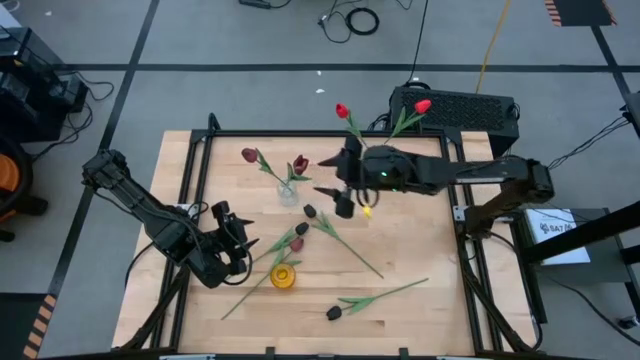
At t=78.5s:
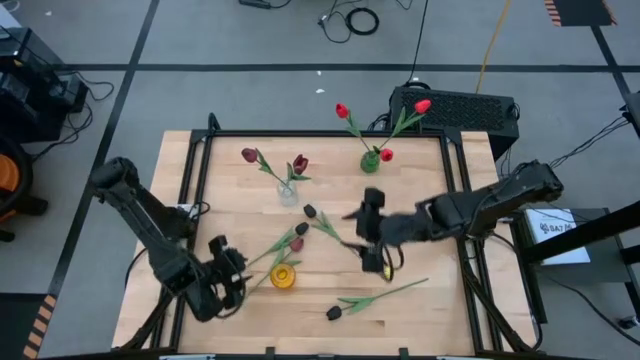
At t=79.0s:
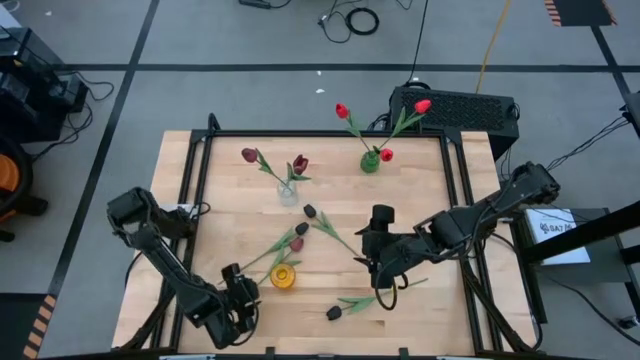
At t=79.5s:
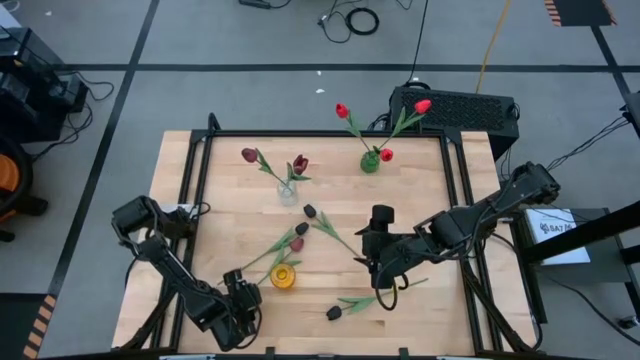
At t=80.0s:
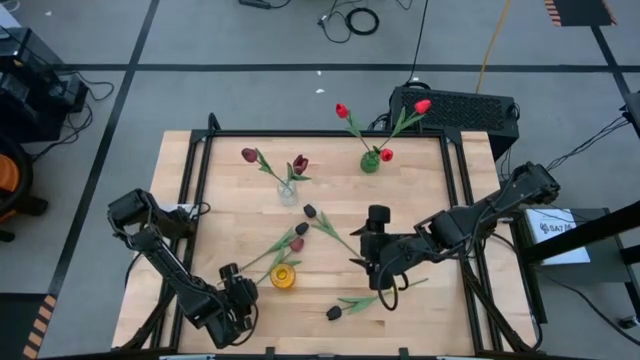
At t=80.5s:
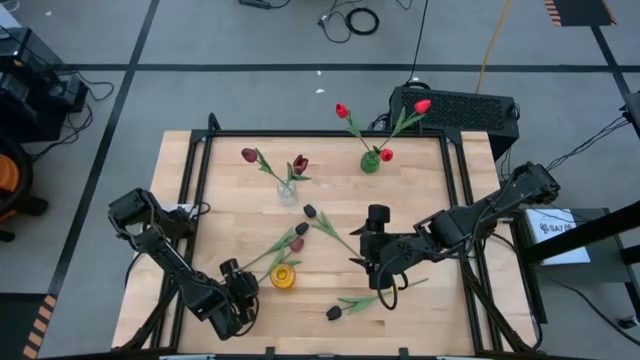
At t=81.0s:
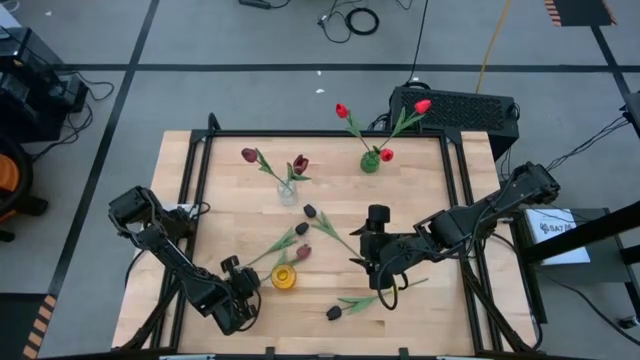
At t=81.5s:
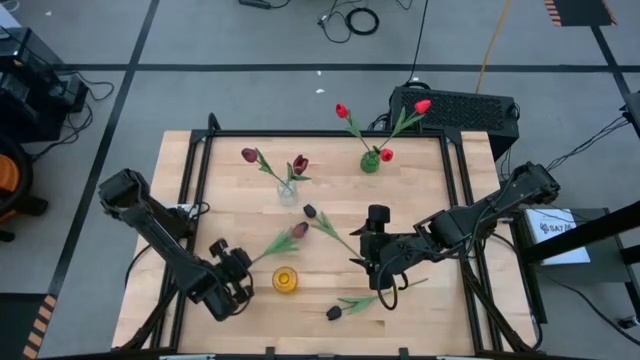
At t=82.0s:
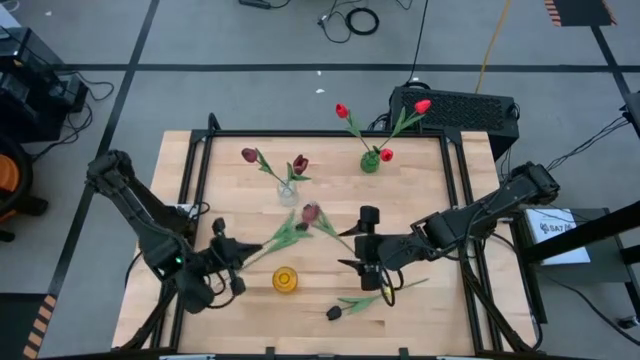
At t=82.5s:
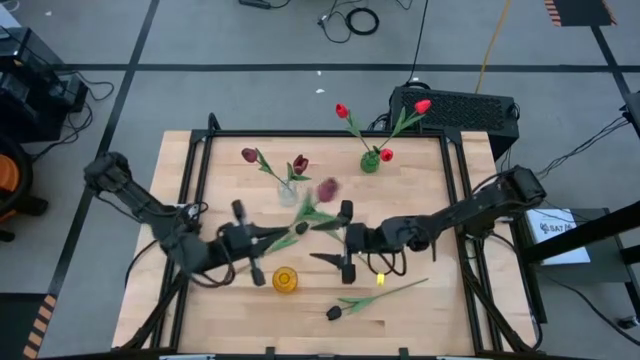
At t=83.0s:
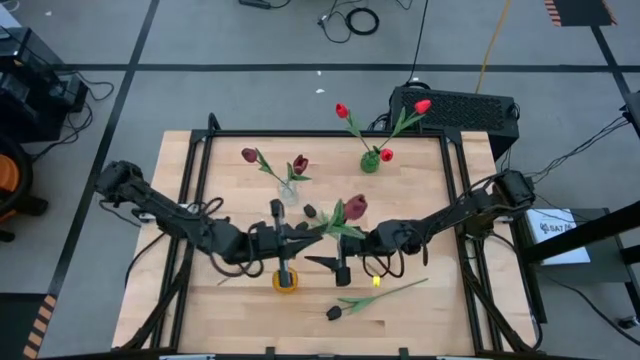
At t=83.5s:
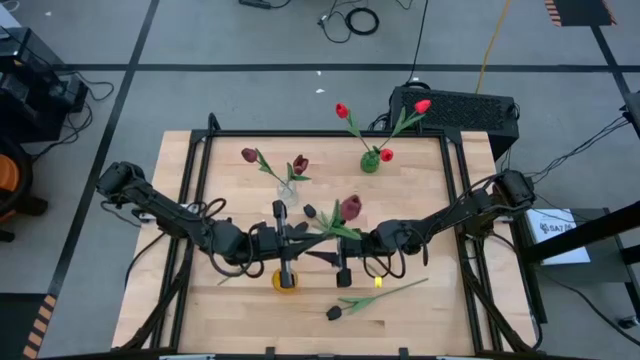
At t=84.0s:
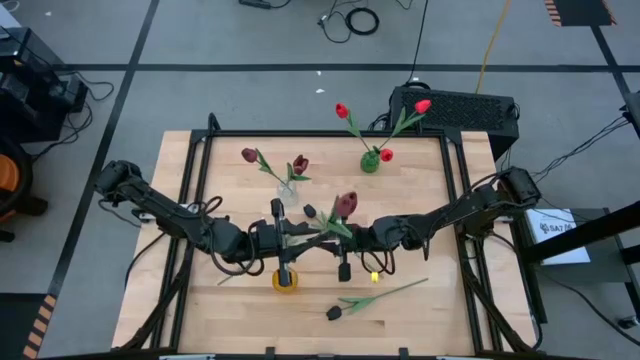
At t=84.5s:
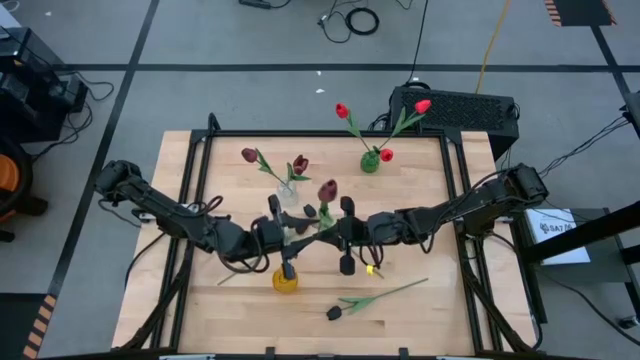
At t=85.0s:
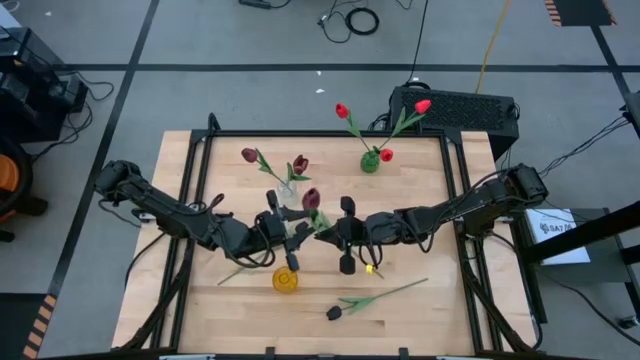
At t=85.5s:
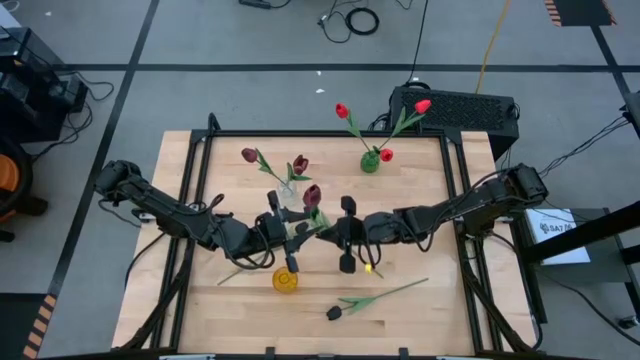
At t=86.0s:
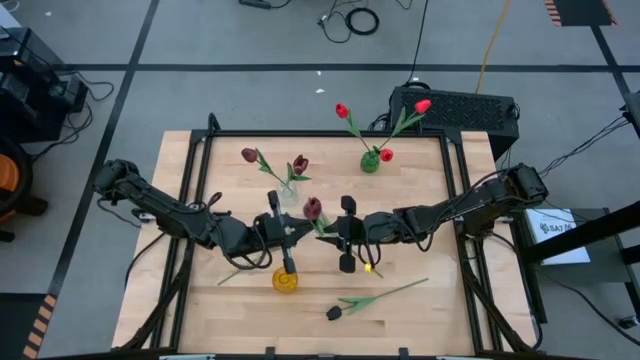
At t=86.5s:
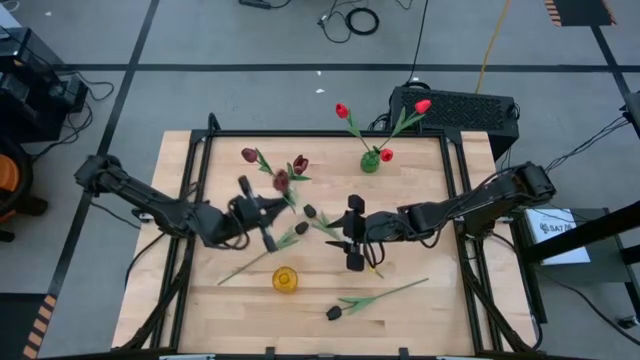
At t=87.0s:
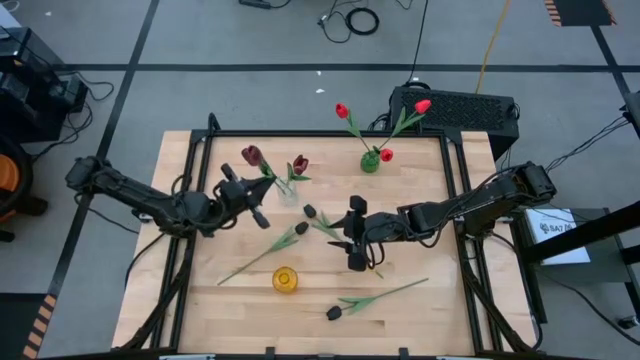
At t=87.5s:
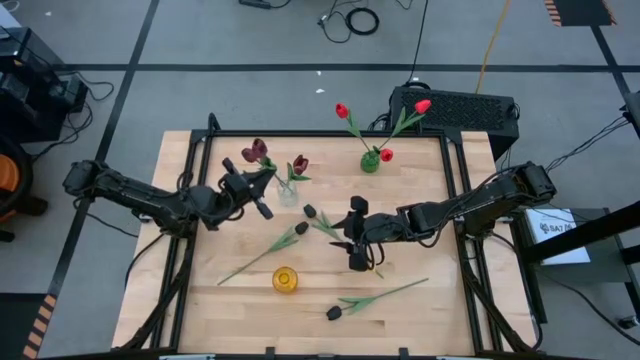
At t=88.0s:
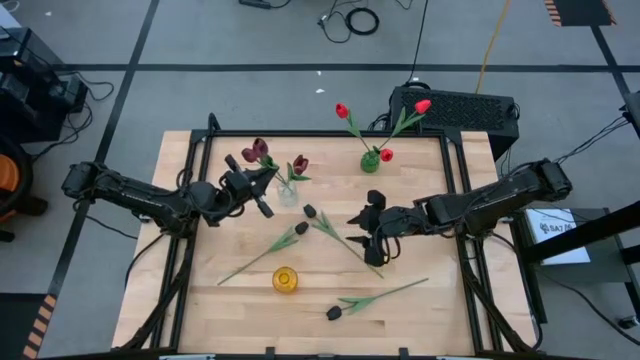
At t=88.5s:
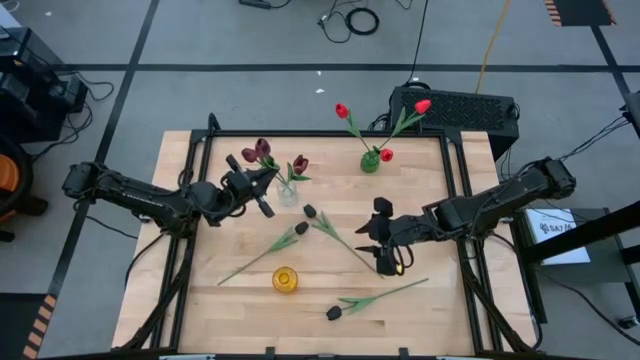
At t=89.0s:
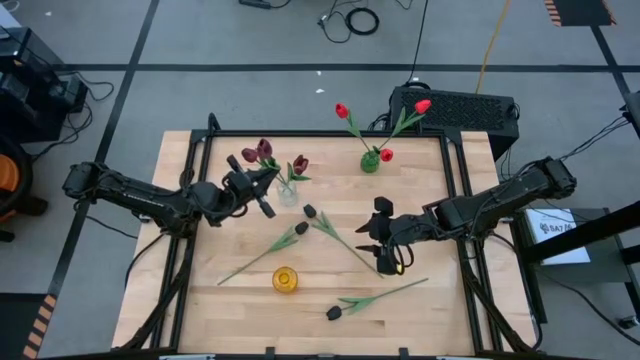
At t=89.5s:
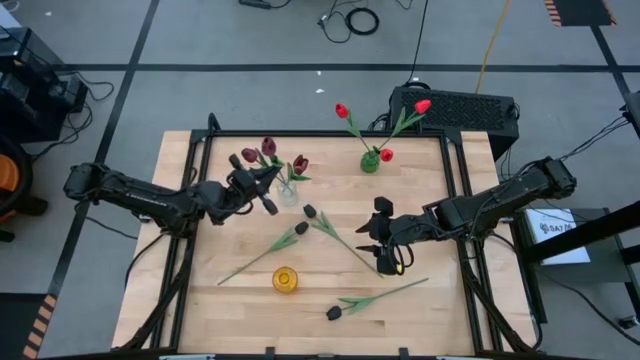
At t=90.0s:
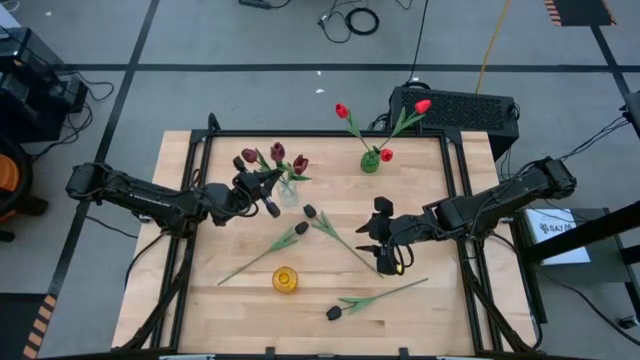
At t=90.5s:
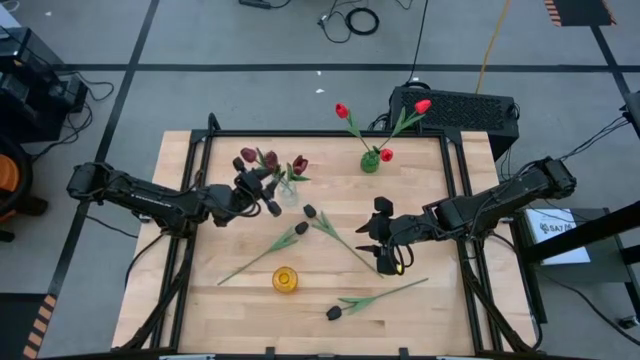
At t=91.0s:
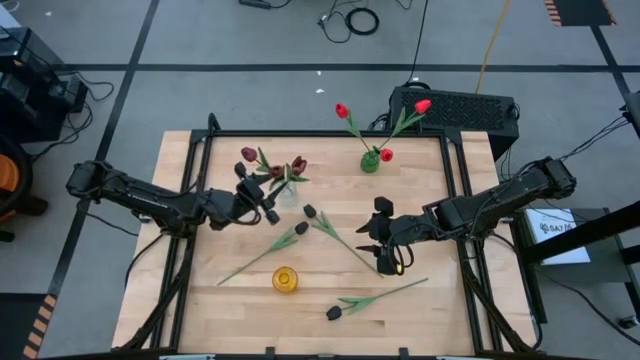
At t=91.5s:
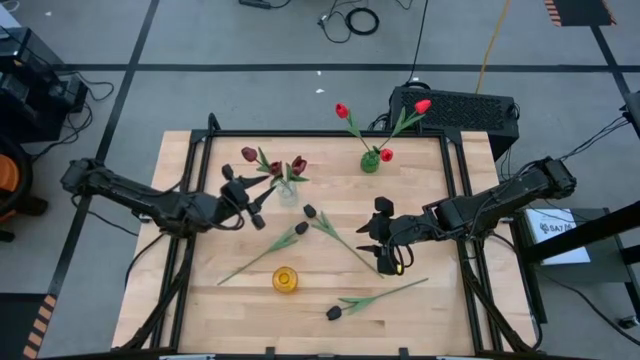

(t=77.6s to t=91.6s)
Task: Sort flowers into vase by color
Put the dark red tulip into the transparent vase

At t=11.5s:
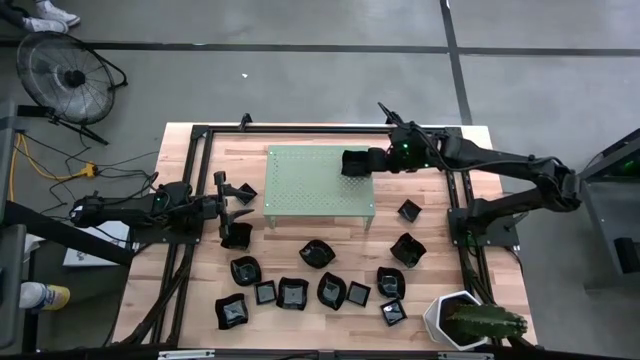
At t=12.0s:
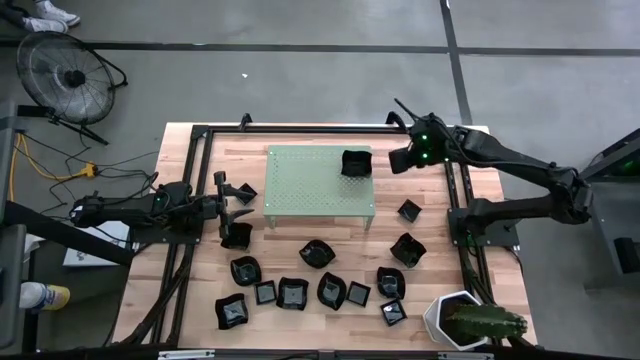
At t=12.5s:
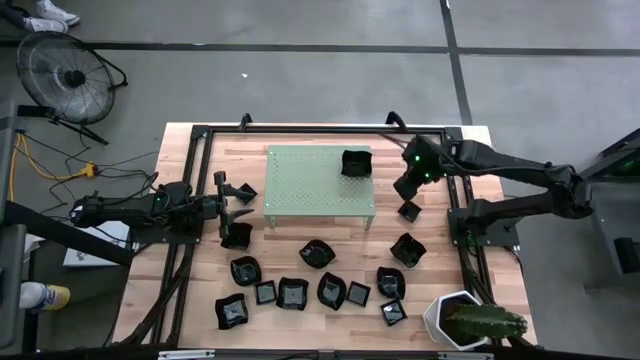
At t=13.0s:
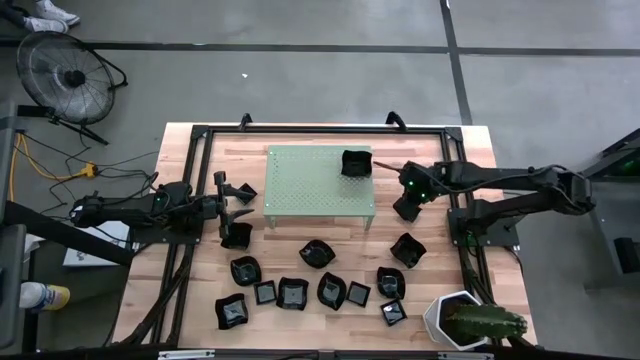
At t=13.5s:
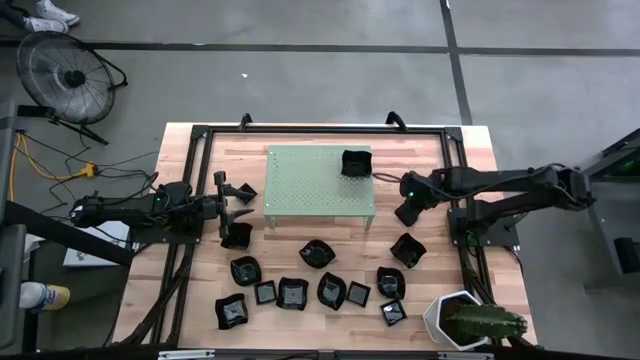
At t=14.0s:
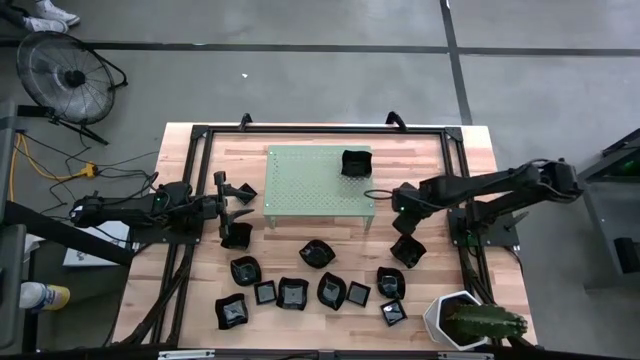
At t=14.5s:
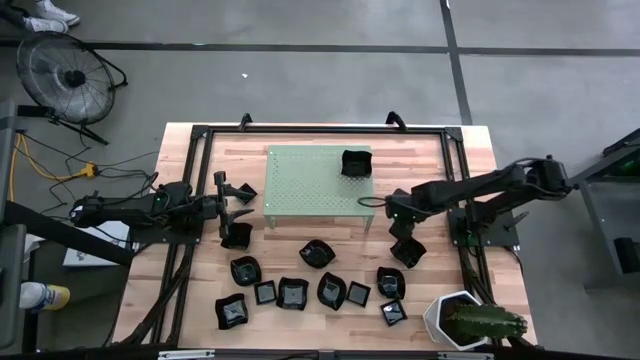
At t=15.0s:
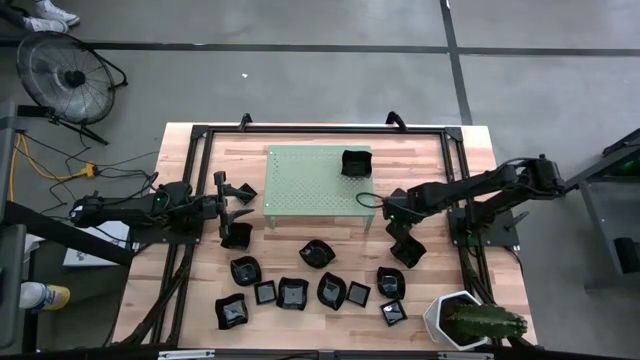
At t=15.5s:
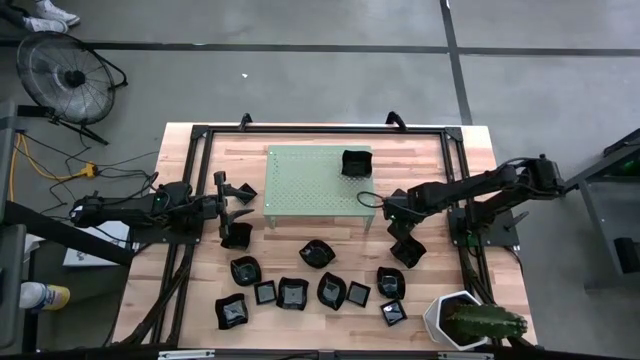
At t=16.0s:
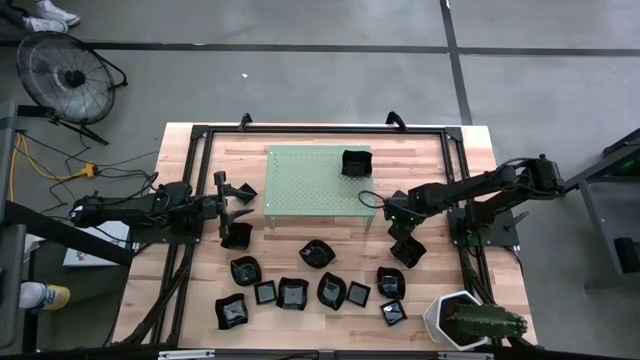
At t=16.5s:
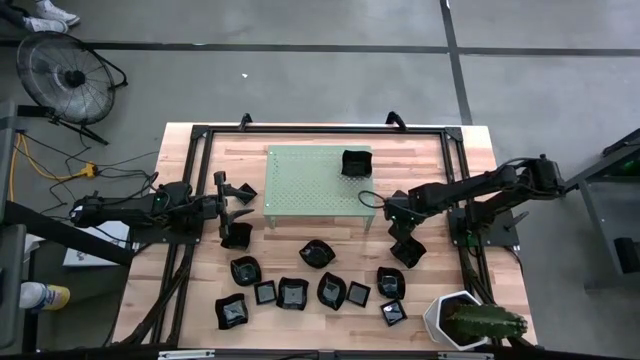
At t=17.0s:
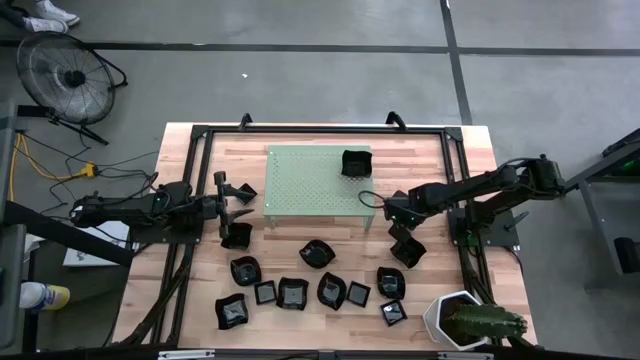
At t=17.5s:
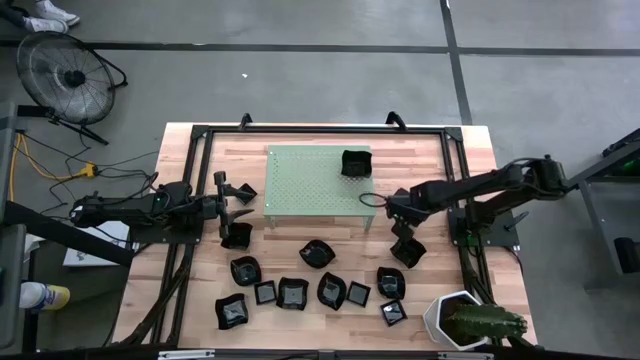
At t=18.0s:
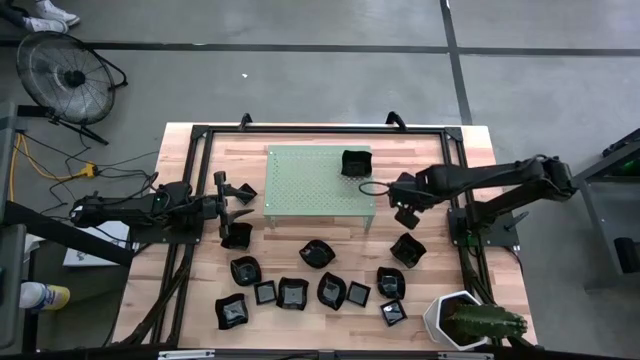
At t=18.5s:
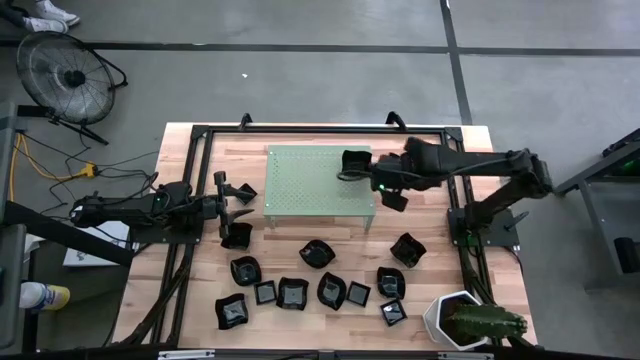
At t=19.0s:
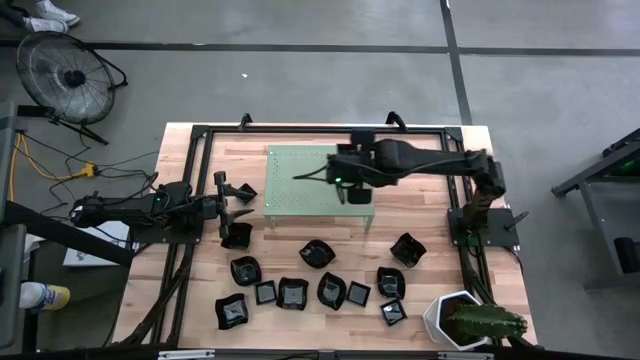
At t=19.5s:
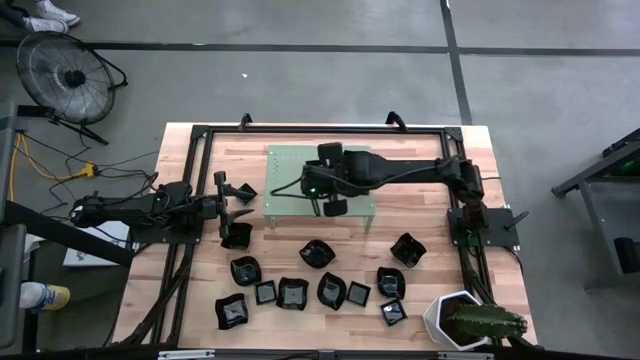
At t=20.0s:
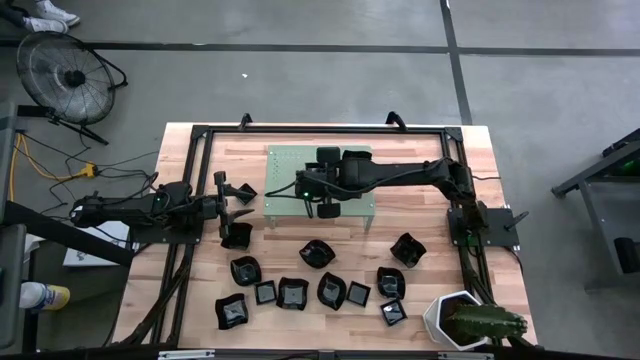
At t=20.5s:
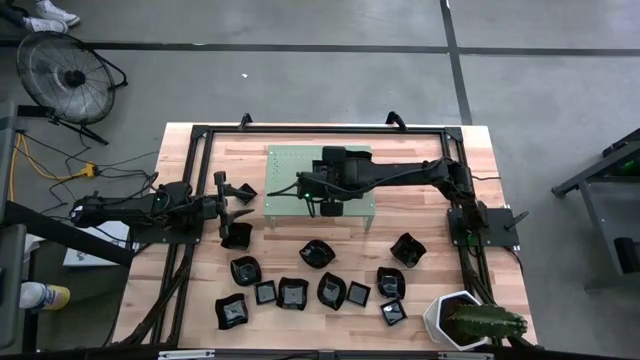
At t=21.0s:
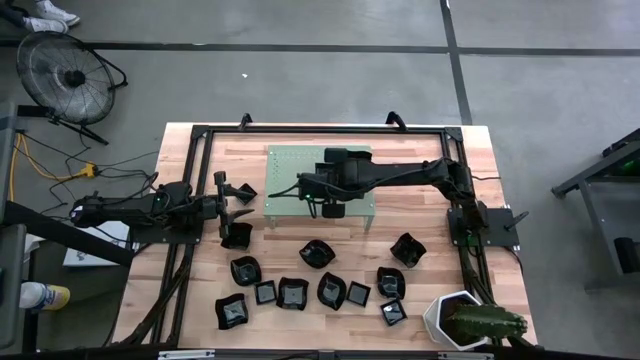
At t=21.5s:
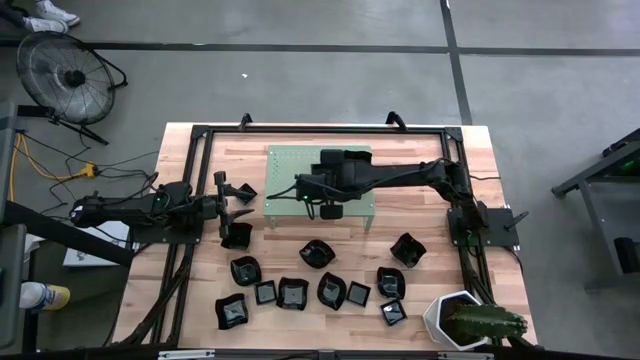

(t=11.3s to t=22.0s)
Task: Pick & Place Mini shaped plates
Put the square plate on the shelf
